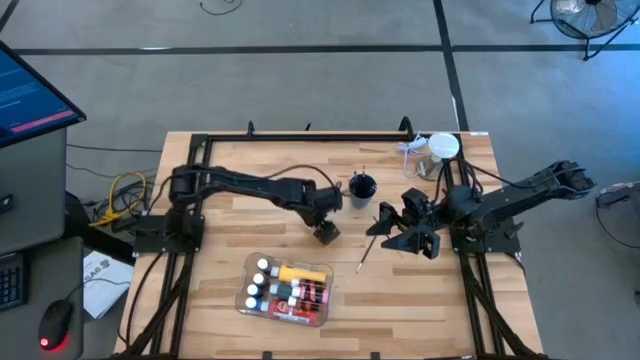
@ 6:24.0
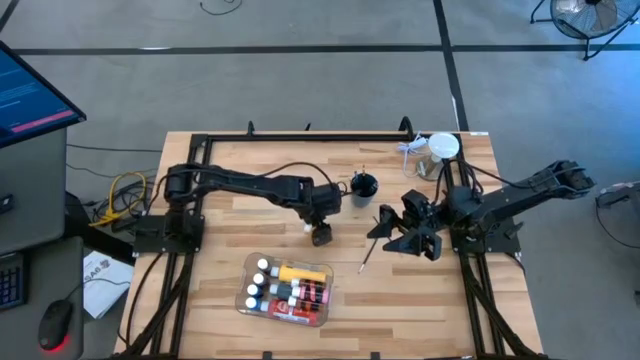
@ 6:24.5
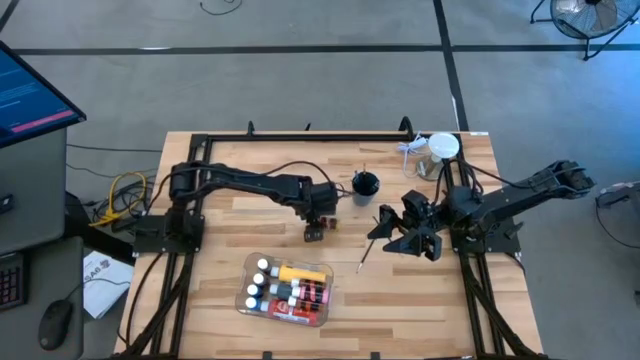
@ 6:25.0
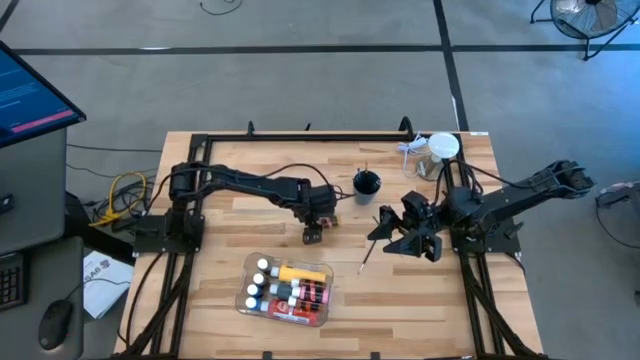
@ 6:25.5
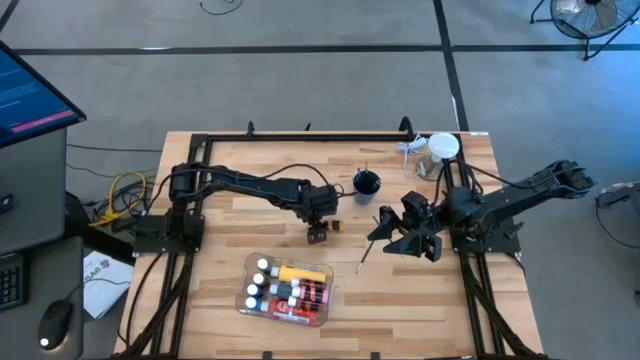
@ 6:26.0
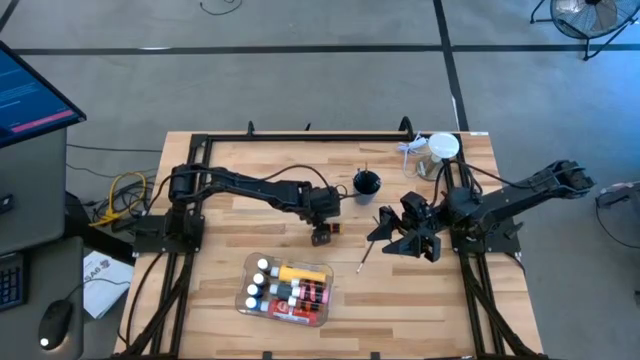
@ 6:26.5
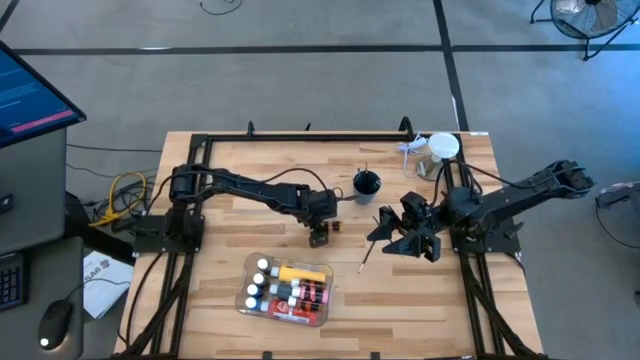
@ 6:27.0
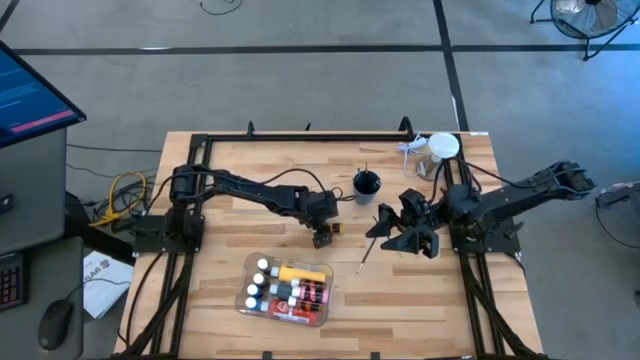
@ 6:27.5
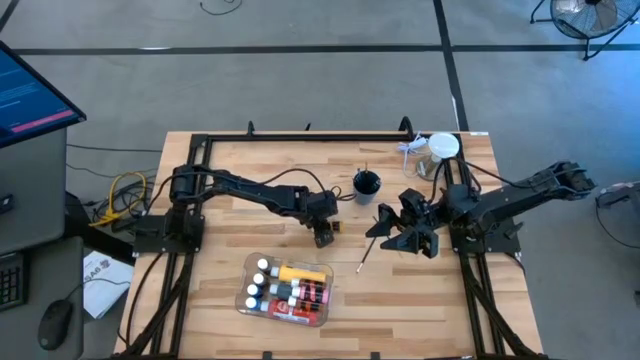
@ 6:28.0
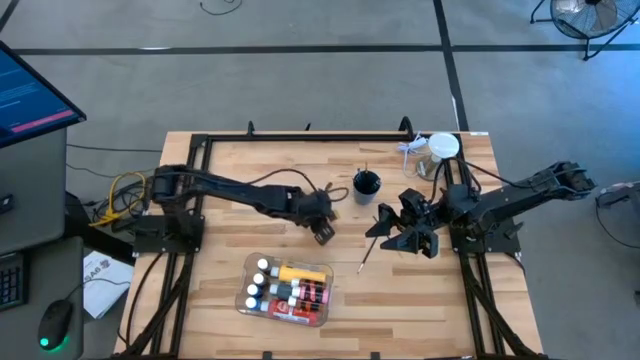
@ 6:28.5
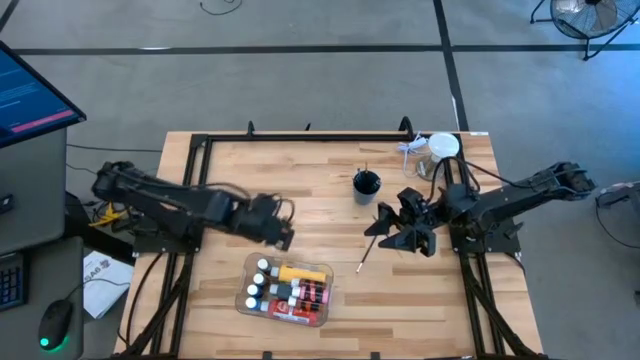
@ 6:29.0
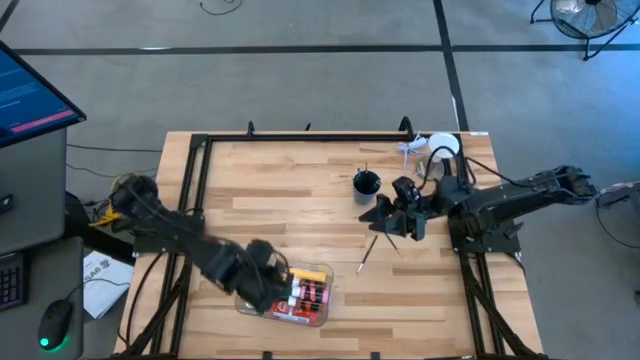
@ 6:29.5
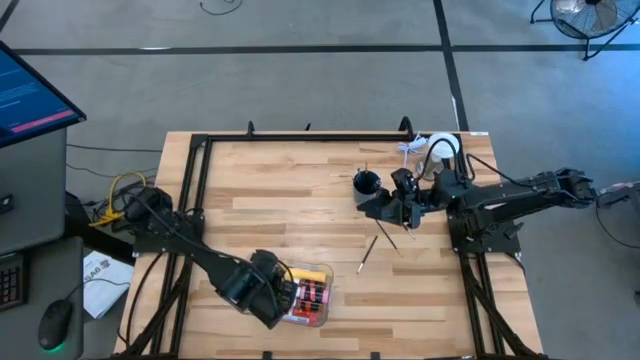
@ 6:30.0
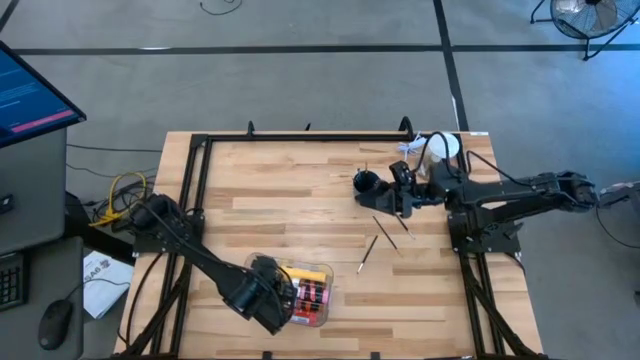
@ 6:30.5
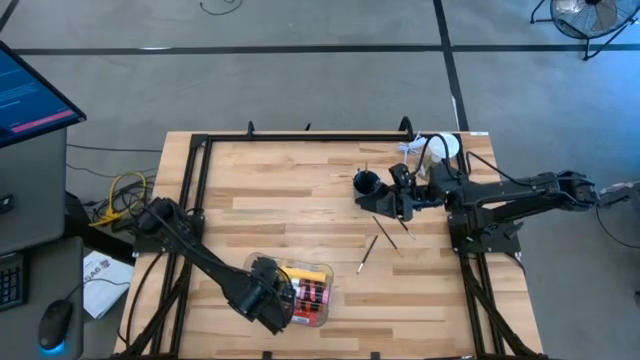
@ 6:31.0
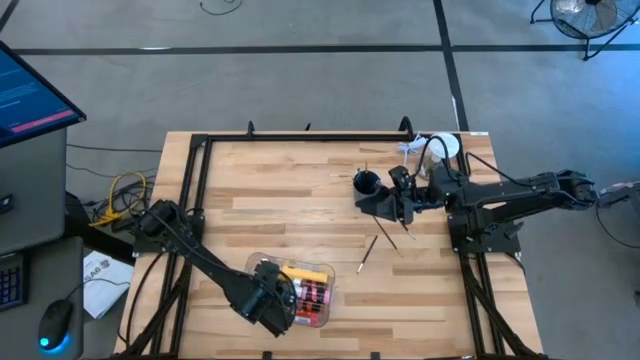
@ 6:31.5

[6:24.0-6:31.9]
Task: Pick & Place Paint Supplies
Put the yellow paint bottle into the transparent bin

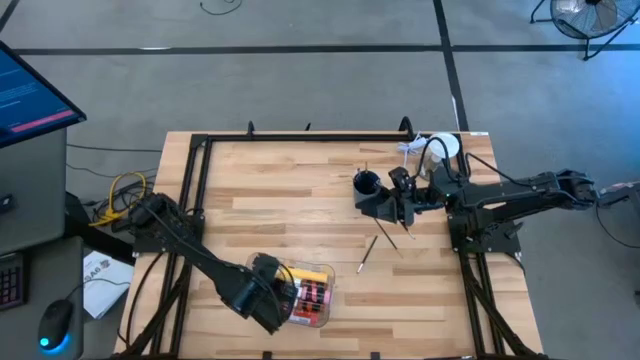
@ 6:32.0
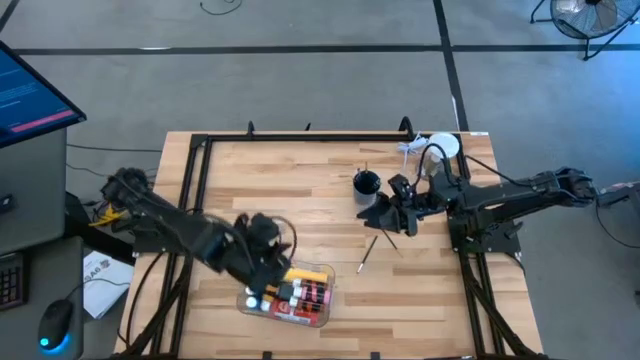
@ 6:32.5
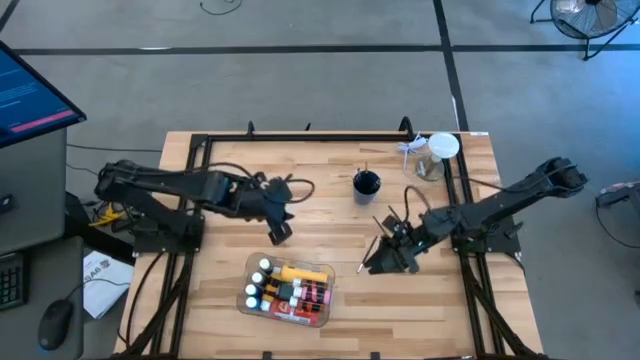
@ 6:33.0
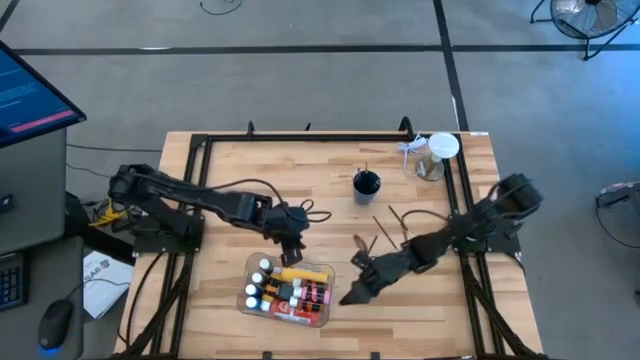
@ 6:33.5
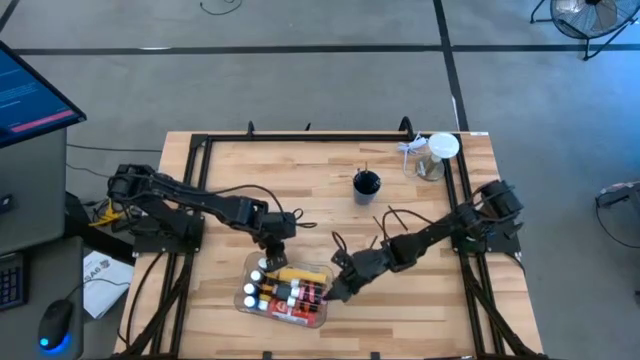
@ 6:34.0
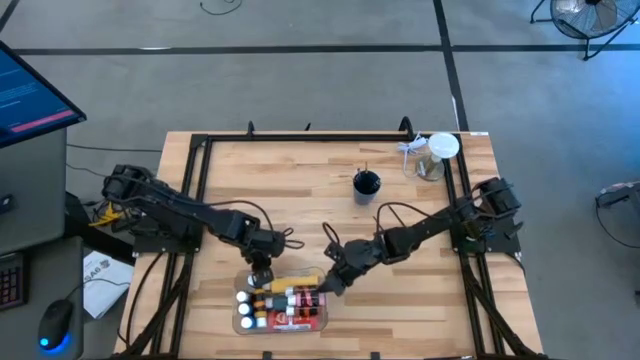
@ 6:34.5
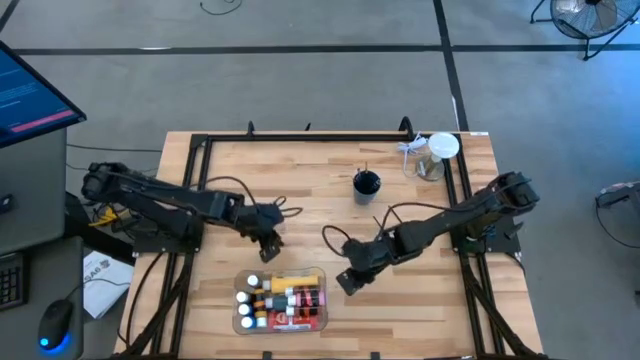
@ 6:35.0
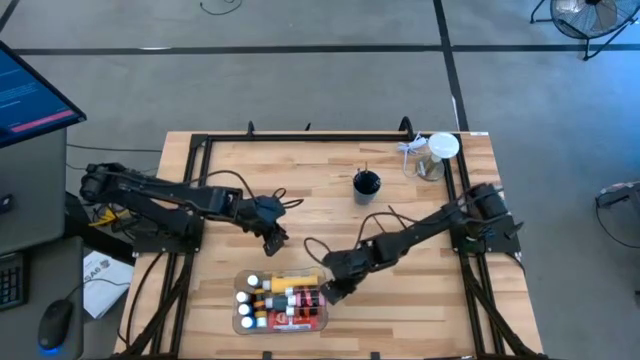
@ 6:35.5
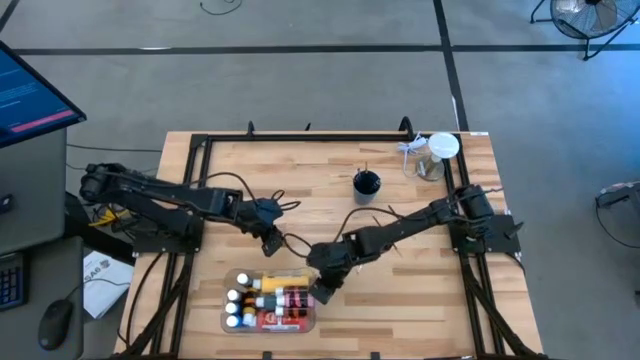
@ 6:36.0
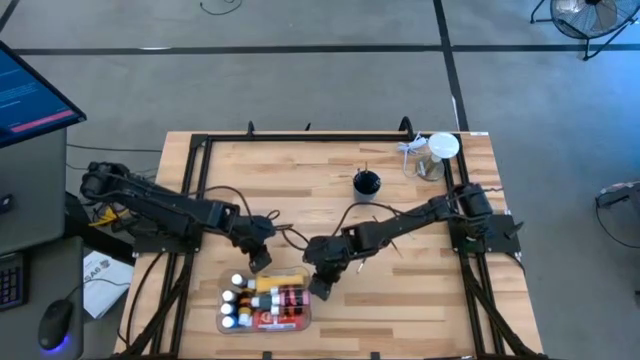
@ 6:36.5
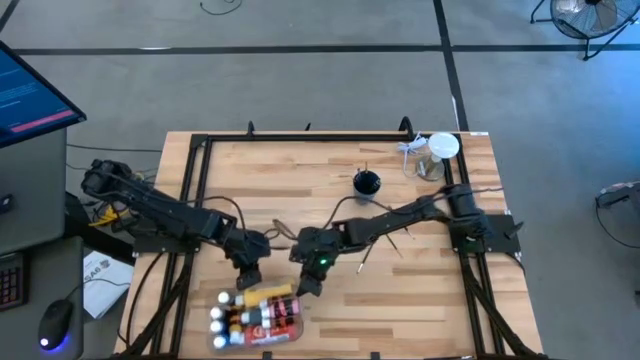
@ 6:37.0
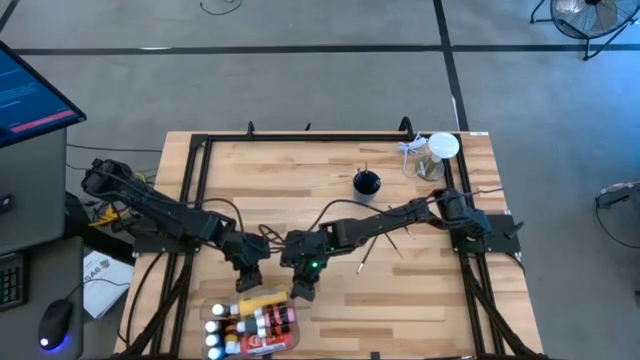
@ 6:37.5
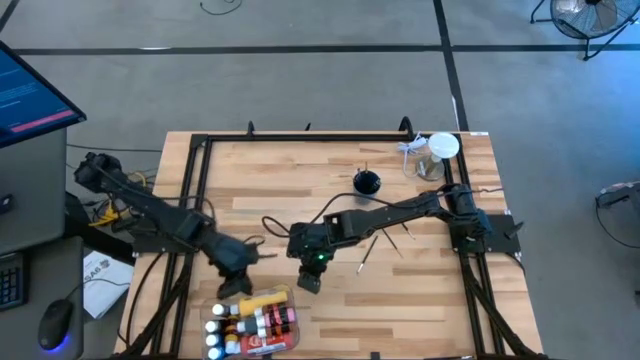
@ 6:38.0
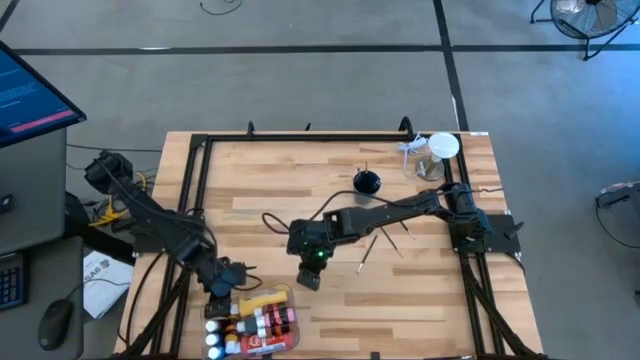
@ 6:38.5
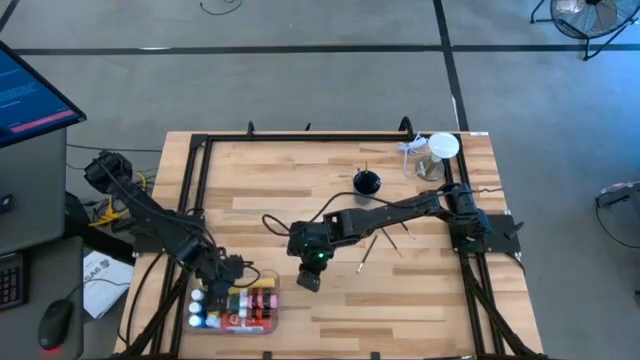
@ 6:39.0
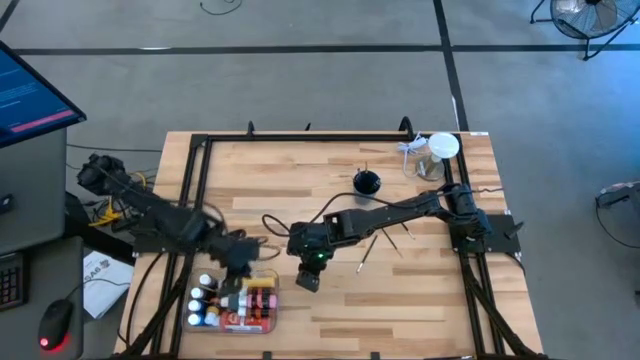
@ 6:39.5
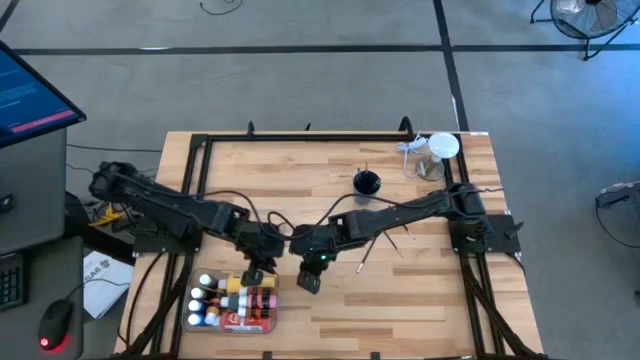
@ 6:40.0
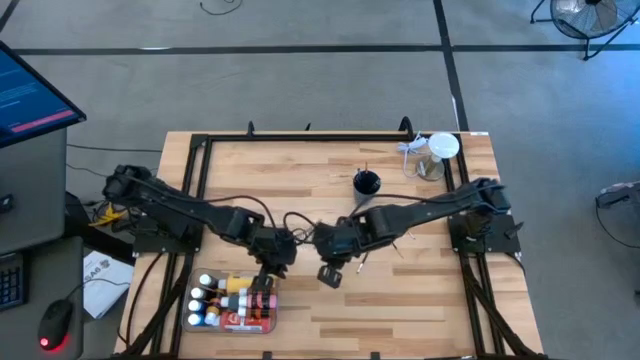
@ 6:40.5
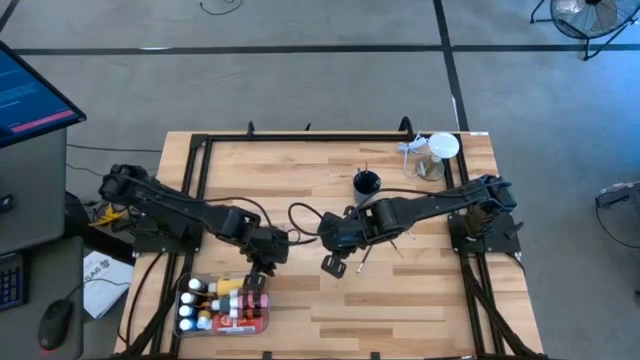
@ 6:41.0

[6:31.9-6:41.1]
Move the transparent bin to the bottom left of the table

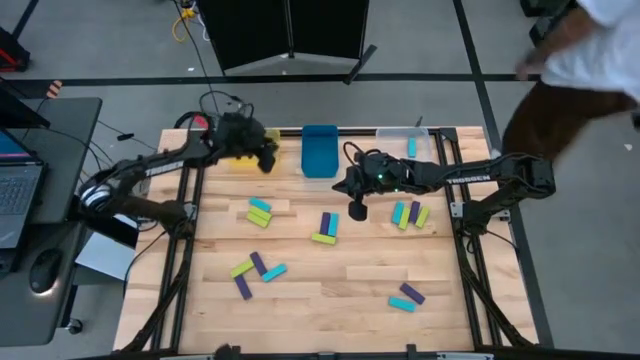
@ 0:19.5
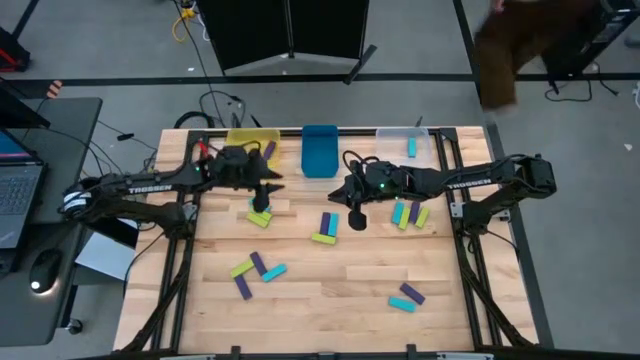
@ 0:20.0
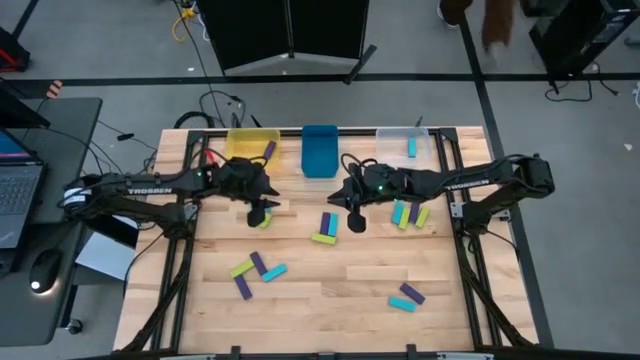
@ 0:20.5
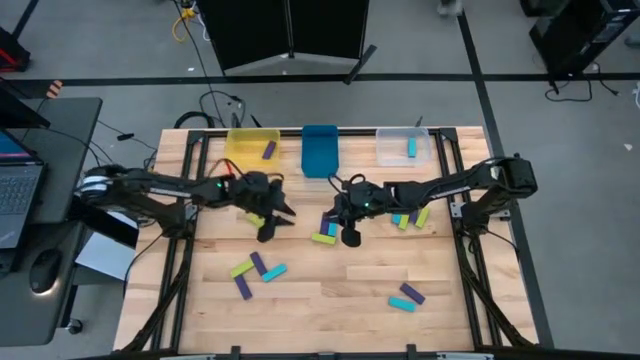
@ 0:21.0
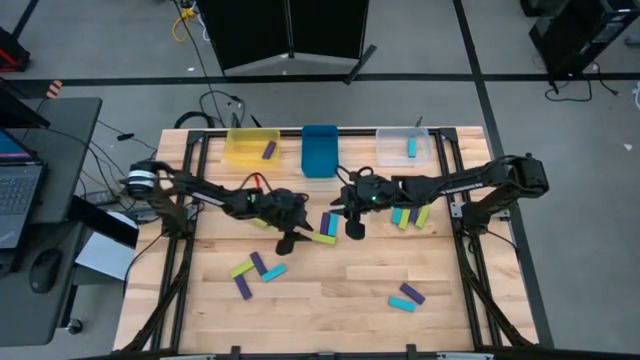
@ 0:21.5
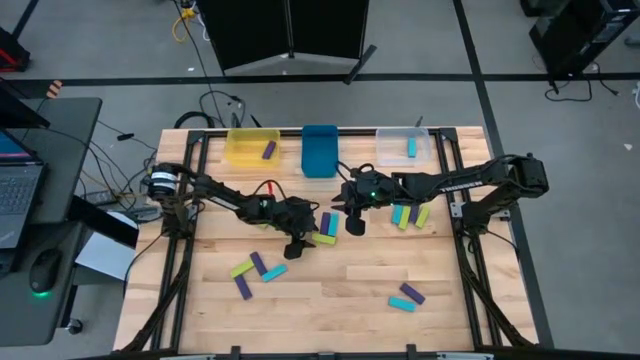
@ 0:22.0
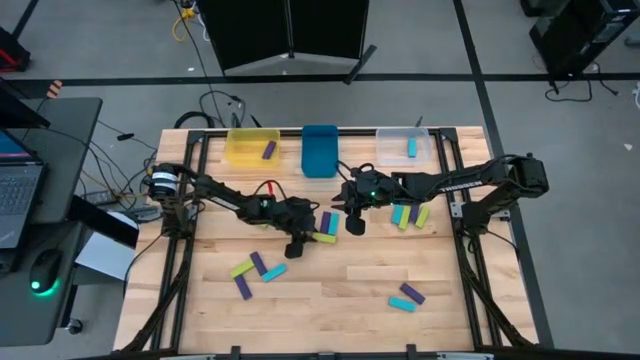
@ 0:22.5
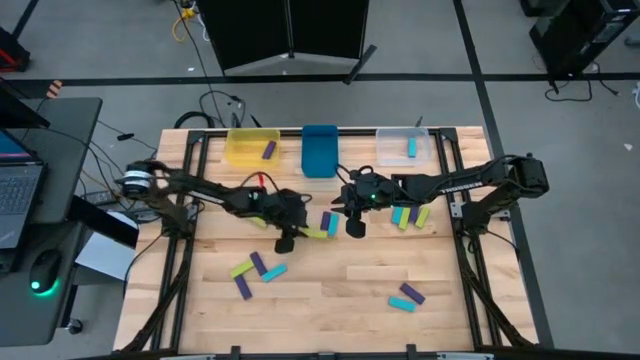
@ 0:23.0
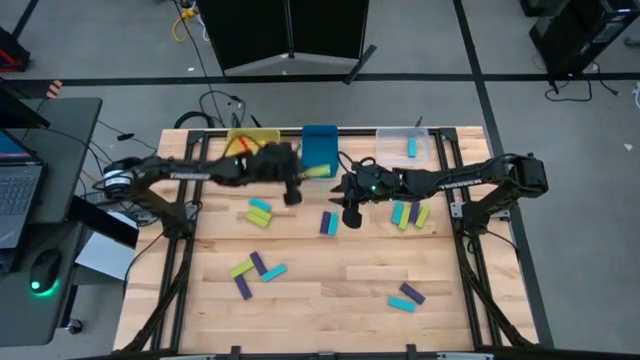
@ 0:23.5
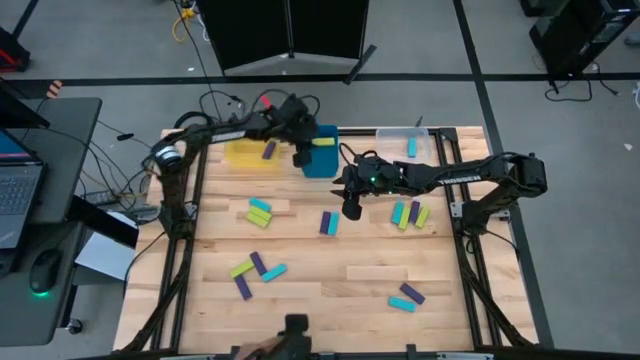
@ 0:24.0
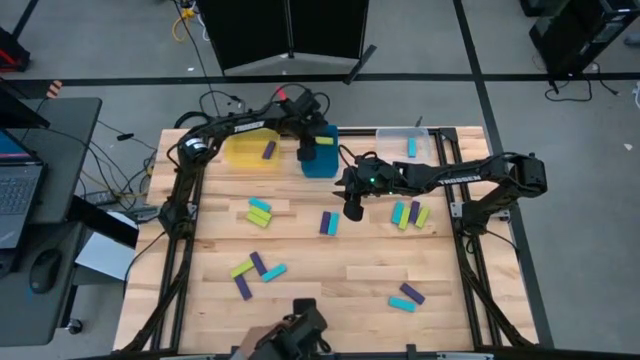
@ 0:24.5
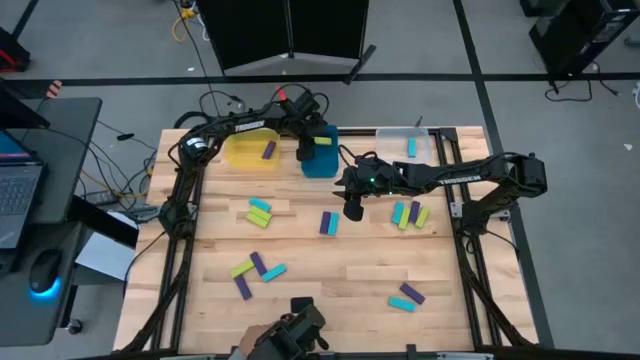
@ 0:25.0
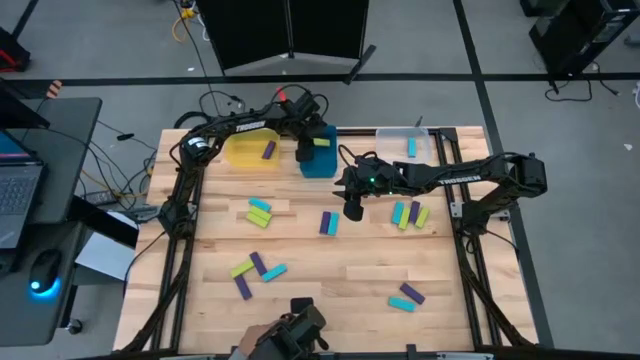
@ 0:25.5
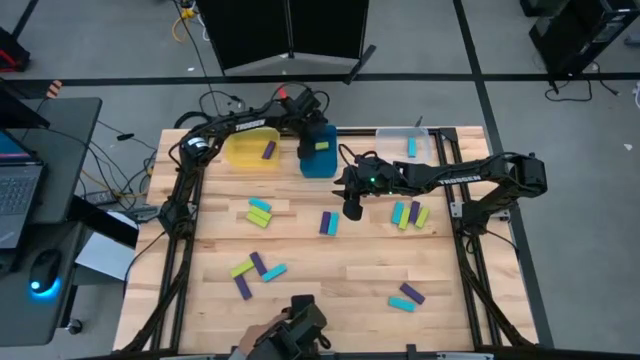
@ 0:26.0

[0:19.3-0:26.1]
Task: Sort blocks
Put the green block into the blue bin
